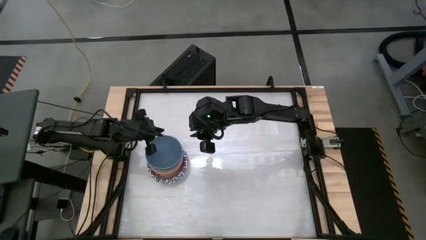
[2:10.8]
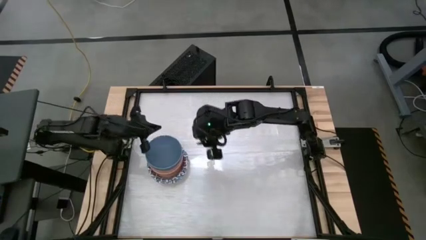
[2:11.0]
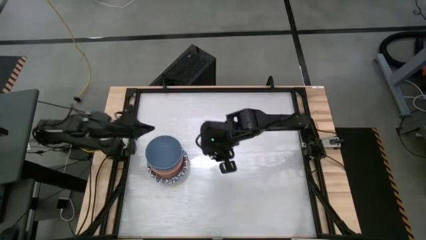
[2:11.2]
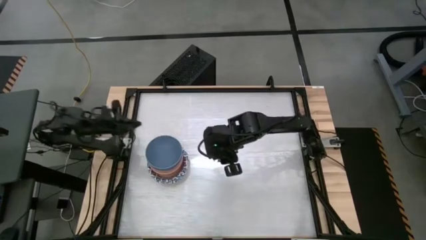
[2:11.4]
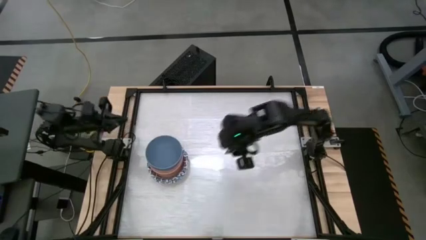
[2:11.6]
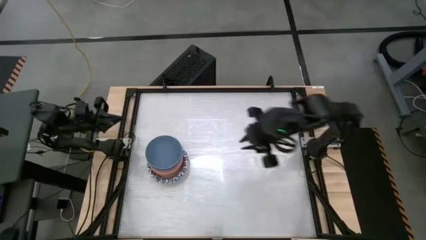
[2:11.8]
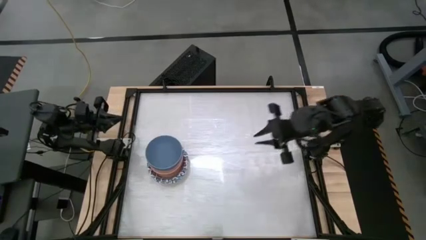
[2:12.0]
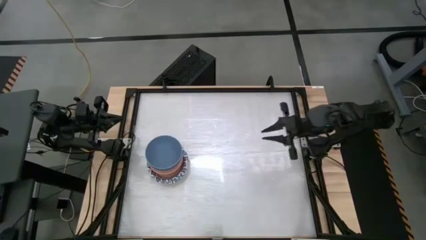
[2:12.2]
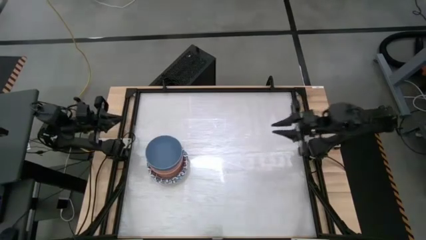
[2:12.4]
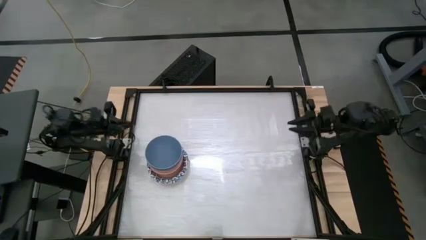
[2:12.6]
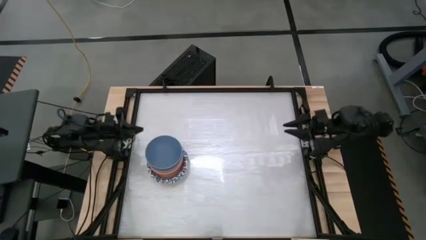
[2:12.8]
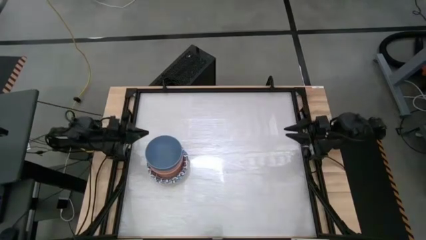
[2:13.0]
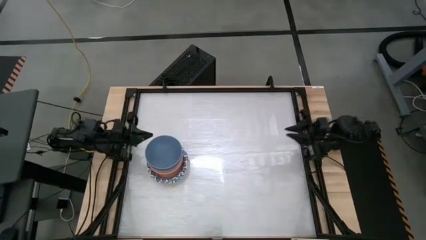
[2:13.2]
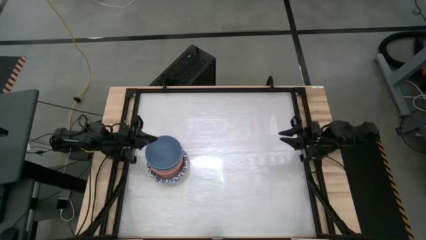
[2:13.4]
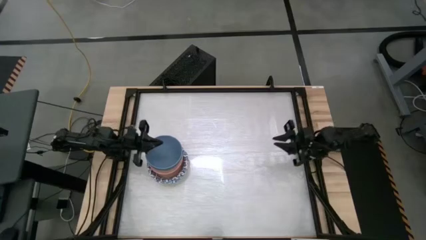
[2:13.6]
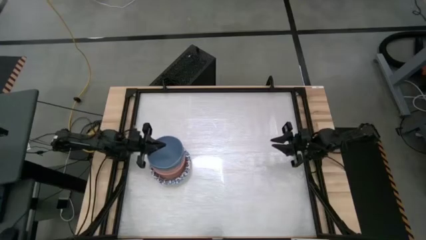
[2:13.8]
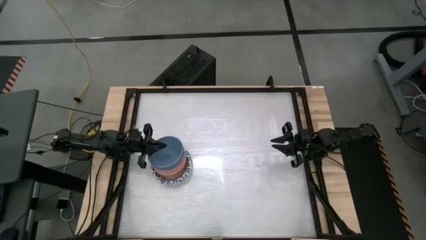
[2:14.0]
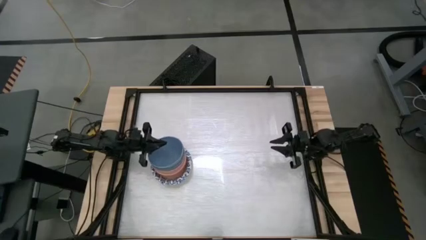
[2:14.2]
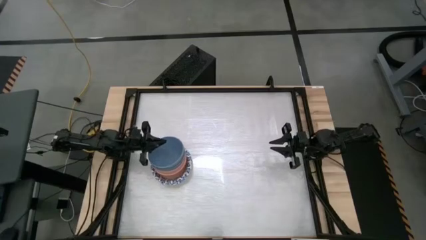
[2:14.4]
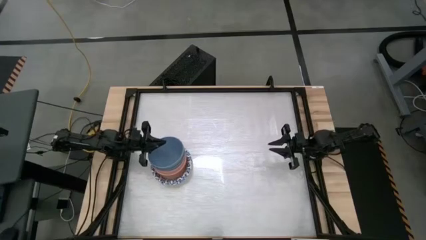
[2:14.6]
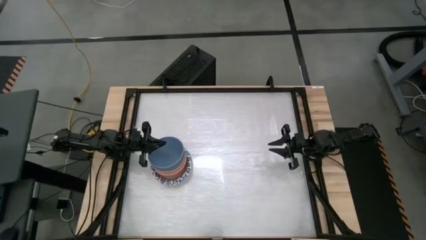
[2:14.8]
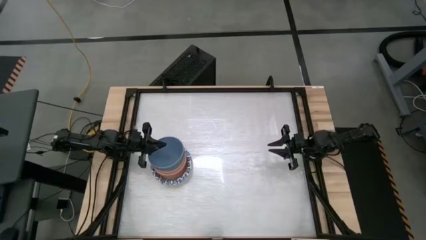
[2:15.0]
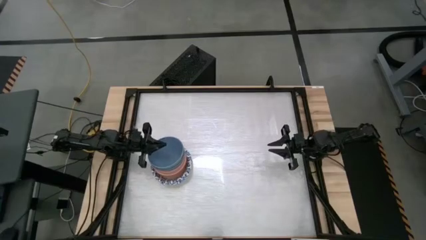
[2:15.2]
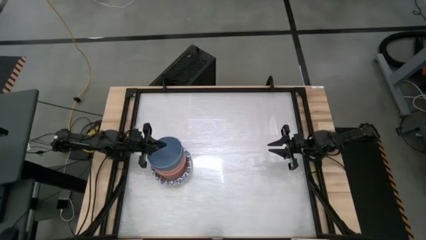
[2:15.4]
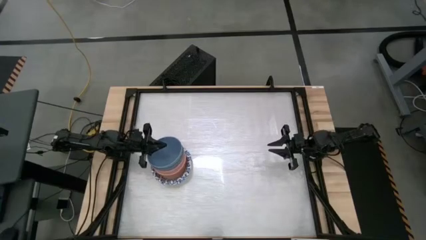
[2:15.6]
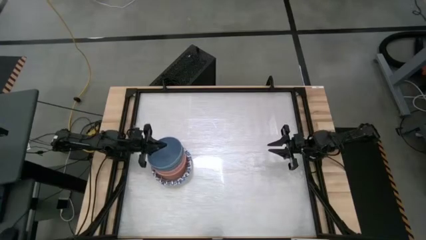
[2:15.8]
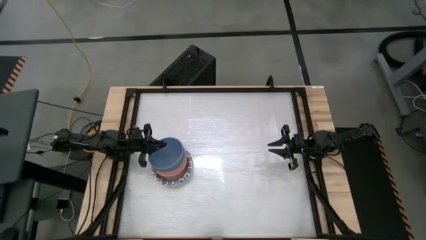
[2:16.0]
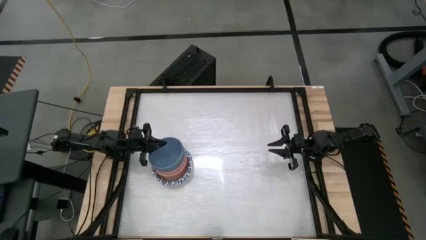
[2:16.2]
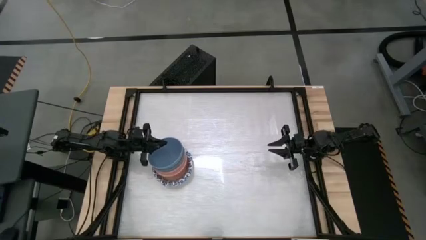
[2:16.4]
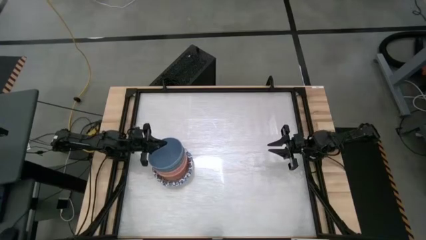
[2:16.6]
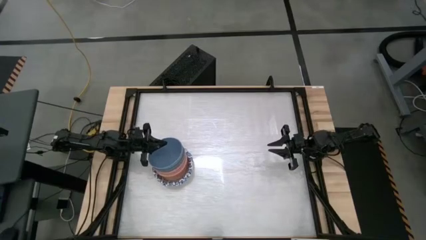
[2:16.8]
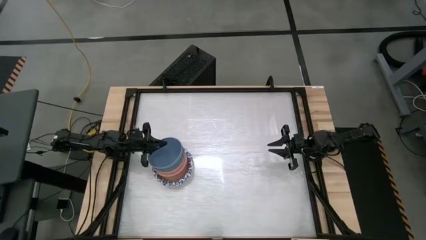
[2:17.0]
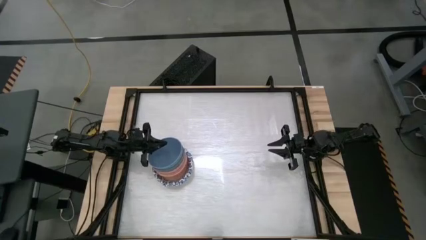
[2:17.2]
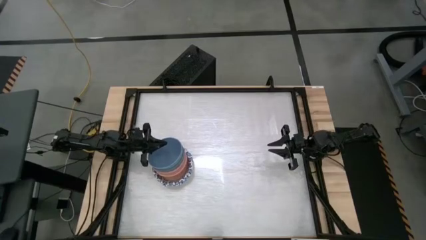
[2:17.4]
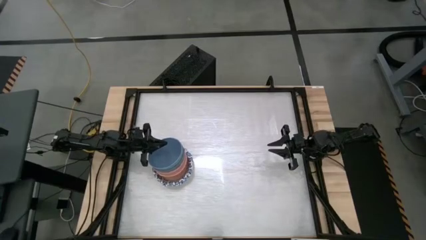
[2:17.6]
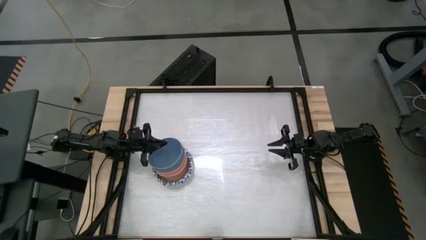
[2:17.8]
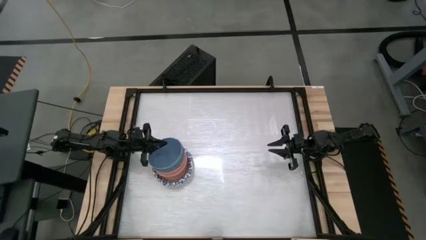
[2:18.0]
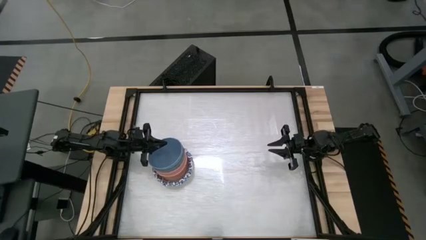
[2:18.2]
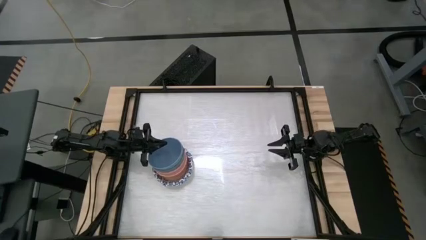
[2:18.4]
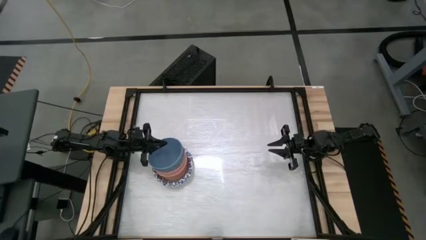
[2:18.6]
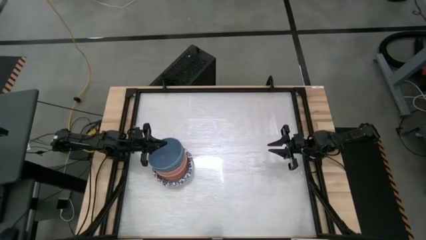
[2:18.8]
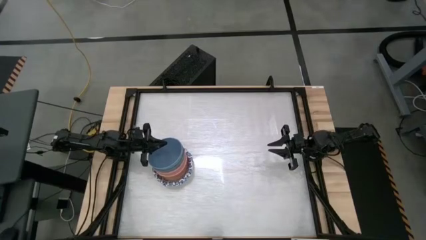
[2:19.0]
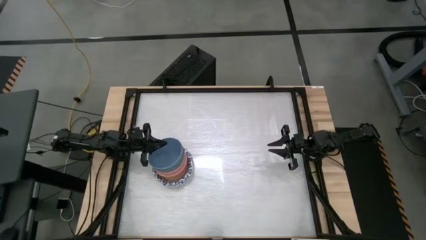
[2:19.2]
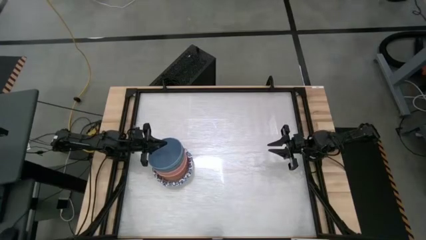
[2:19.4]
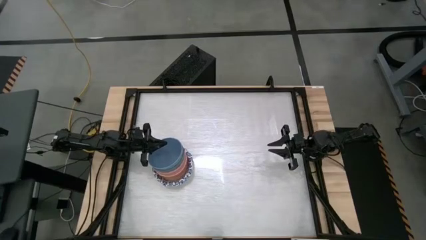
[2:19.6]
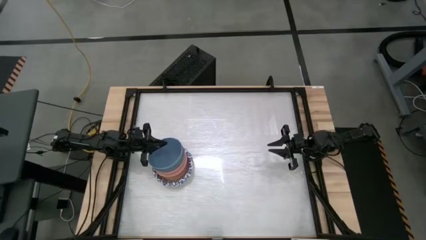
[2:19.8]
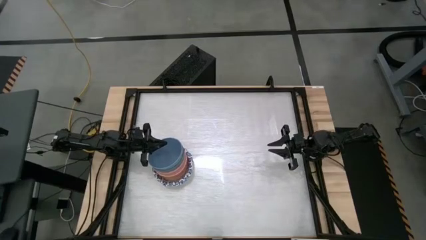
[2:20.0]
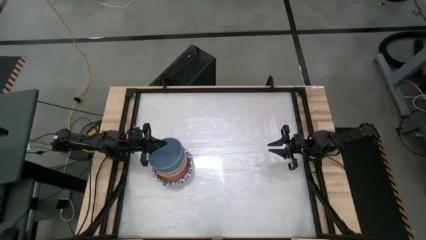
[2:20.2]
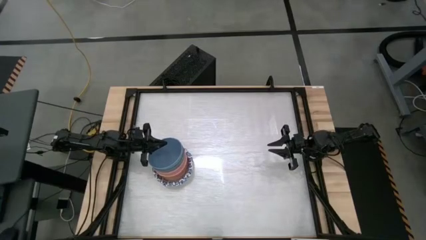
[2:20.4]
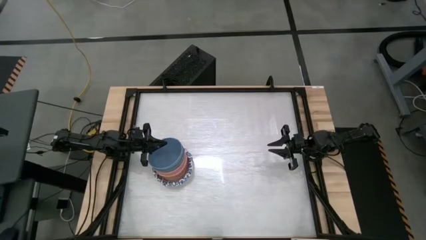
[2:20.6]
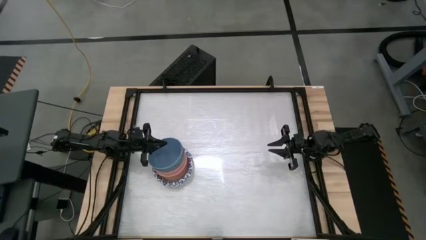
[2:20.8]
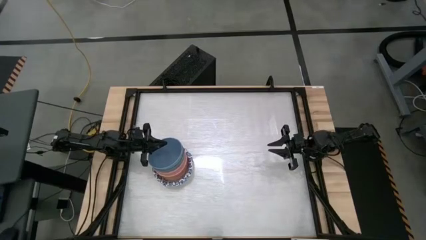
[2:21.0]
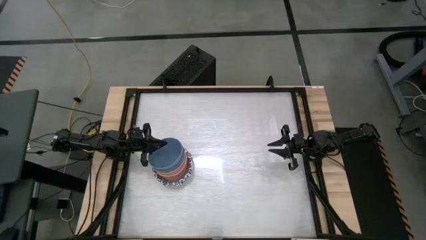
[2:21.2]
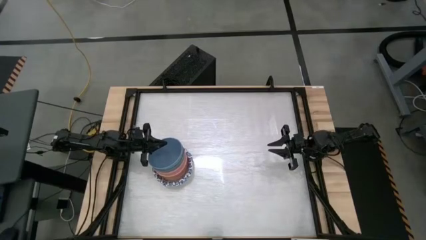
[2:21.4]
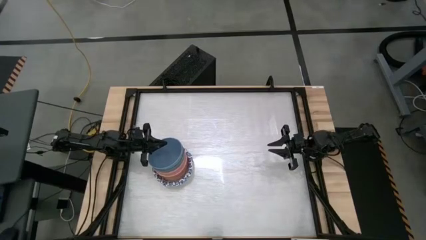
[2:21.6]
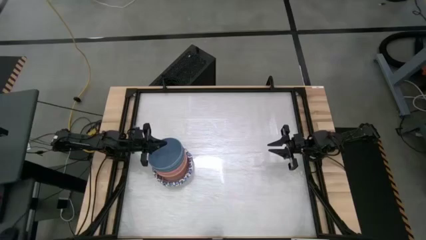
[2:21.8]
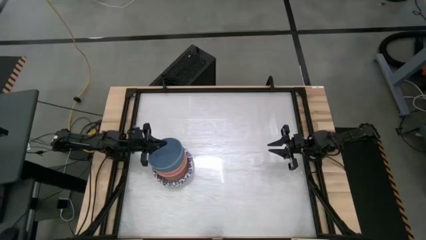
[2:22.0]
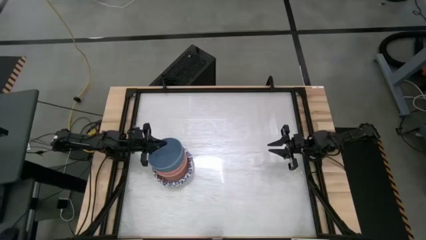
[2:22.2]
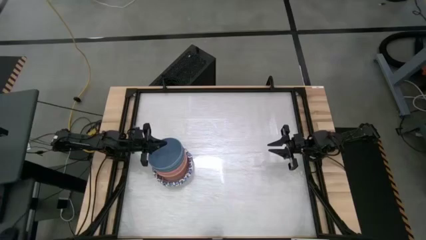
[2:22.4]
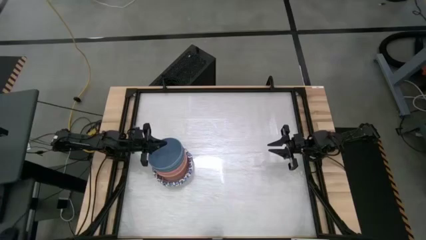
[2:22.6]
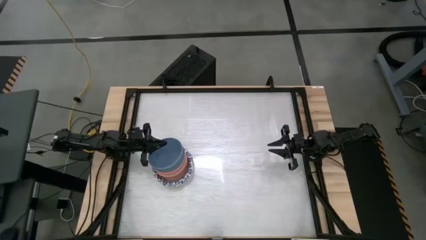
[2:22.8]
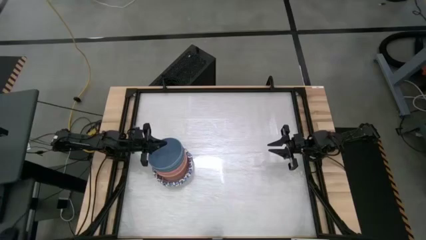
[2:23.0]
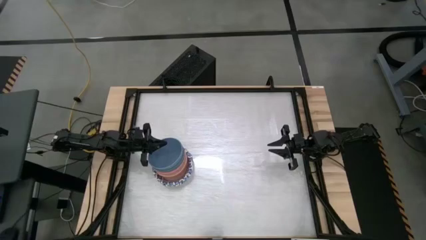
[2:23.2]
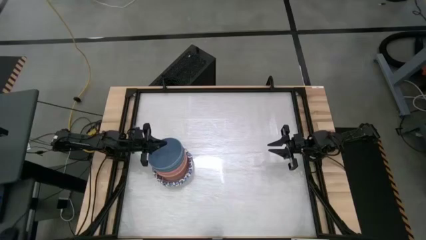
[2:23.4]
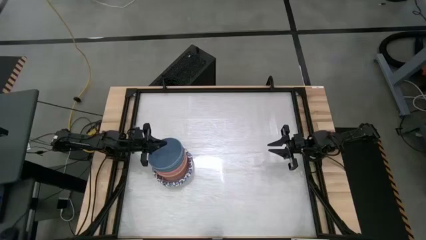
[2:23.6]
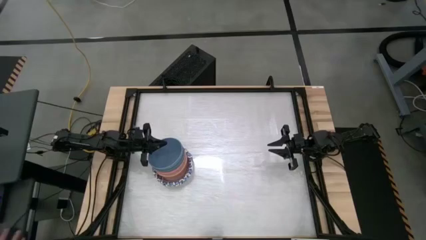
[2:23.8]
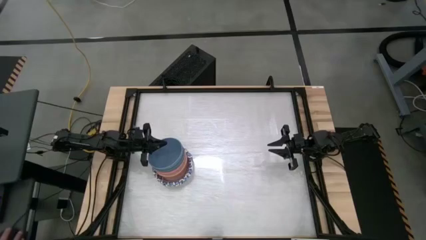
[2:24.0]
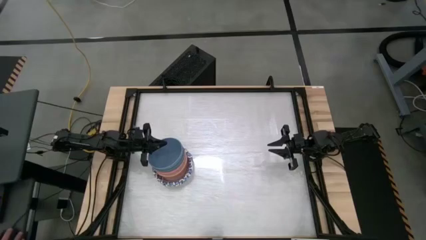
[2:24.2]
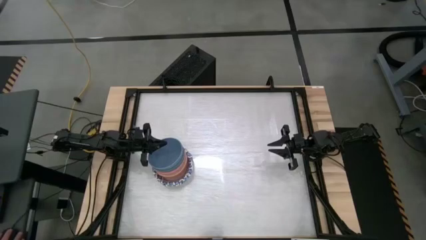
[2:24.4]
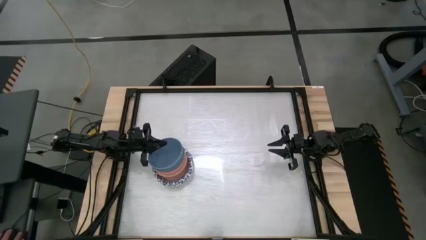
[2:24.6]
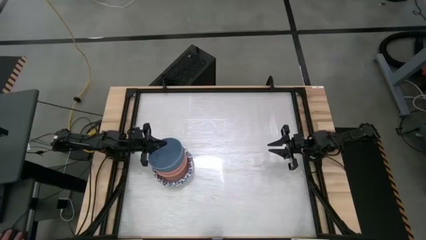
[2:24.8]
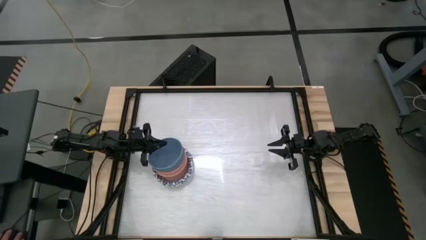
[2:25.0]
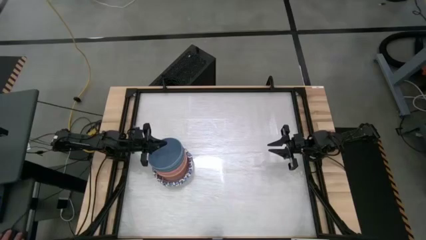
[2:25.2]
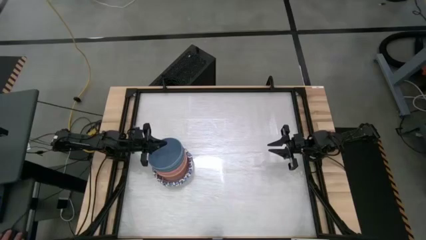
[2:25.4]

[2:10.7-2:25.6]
Return to Home Position
